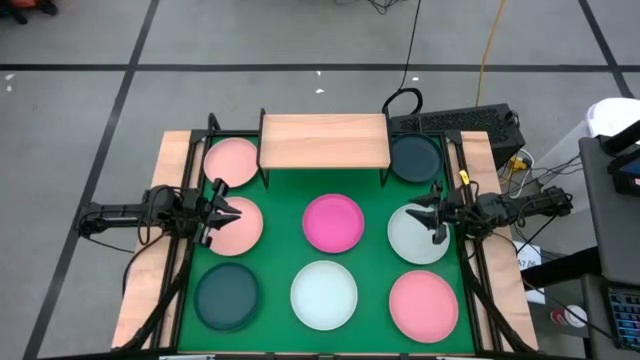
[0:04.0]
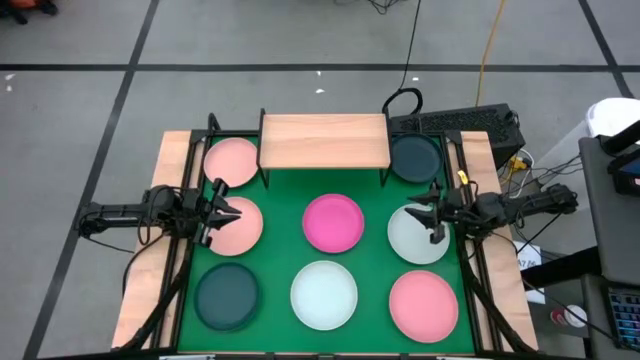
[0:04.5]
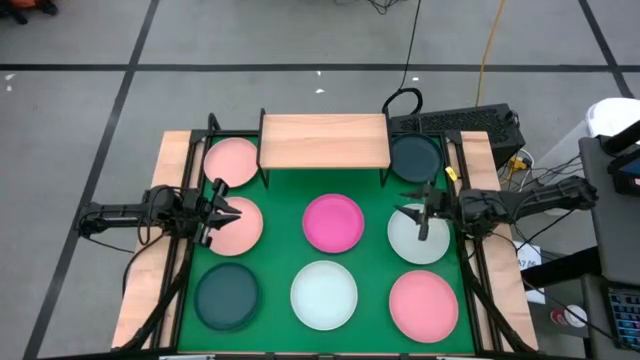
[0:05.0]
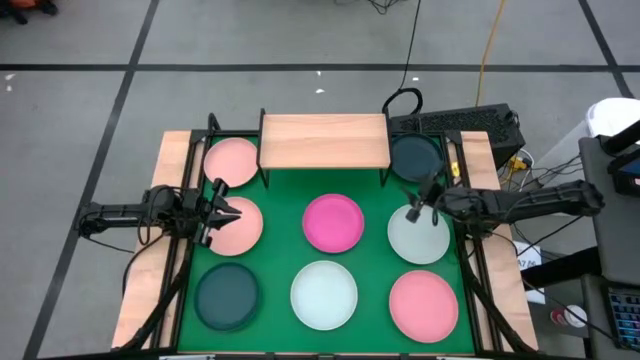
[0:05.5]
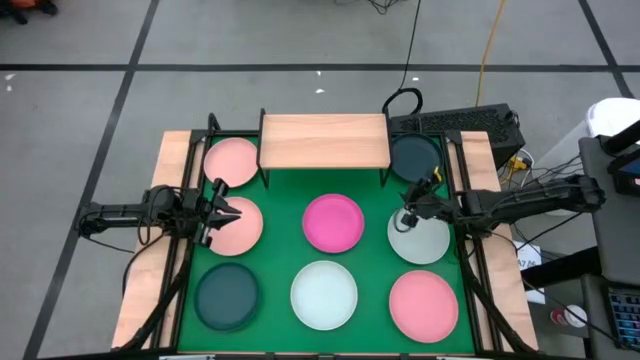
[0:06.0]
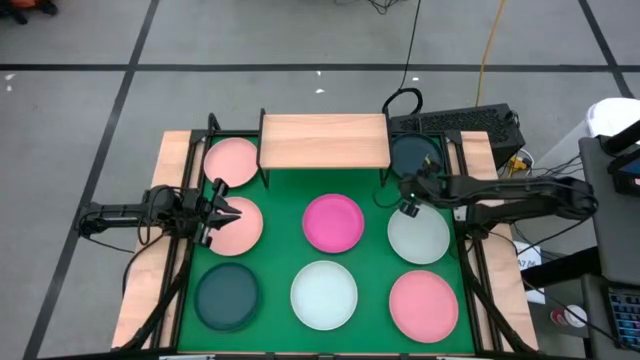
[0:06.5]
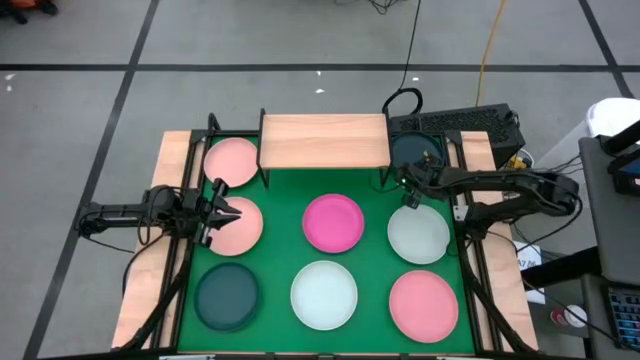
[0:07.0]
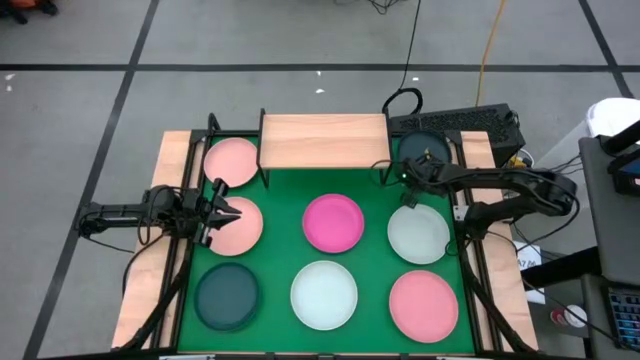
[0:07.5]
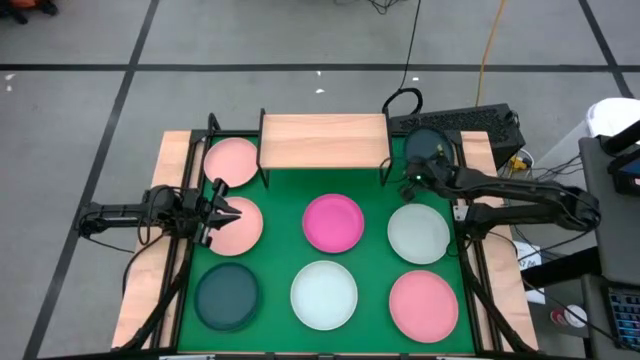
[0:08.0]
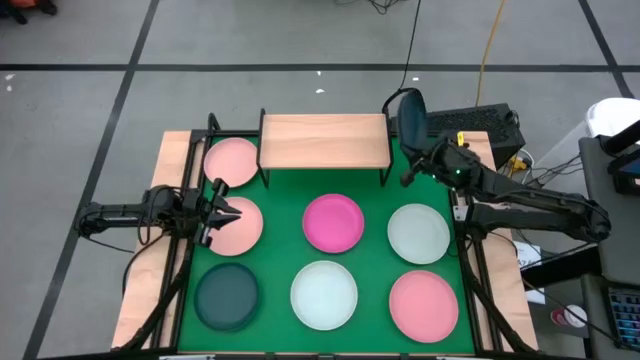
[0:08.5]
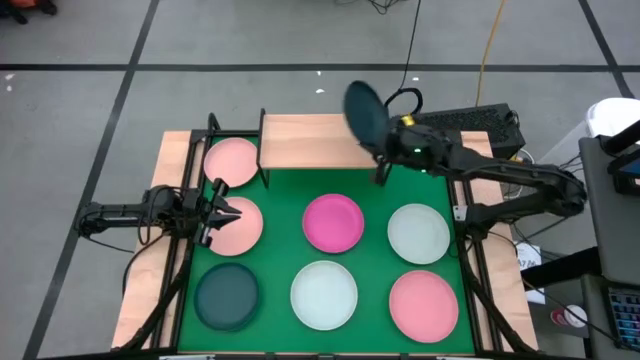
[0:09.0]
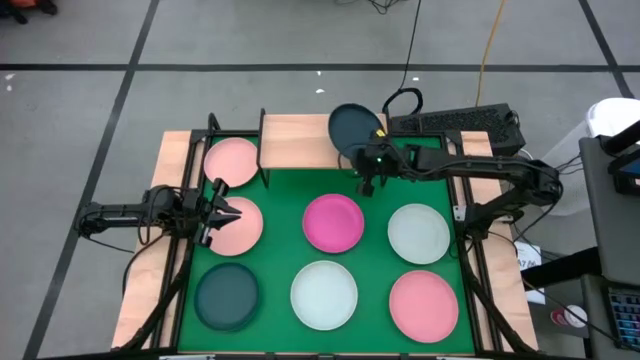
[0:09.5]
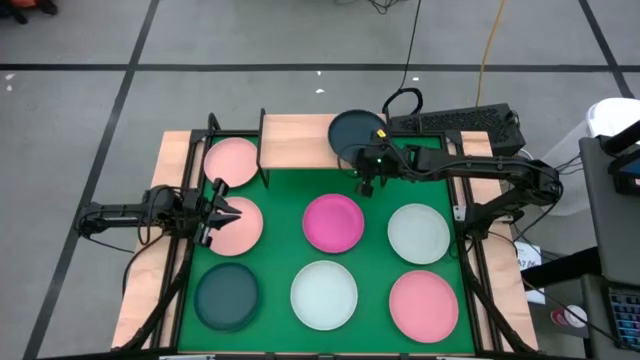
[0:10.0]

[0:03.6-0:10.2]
Task: Place and stack plates onto a shelf
Put the top dark blue plate on the shelf

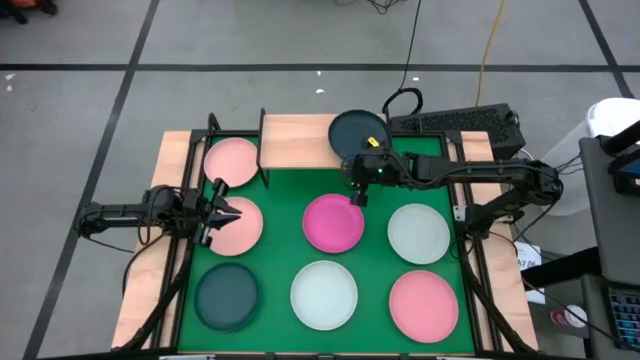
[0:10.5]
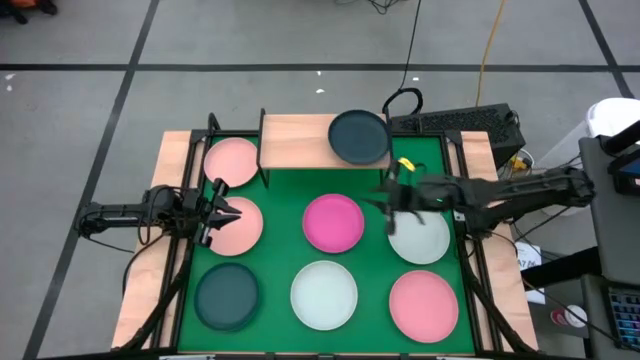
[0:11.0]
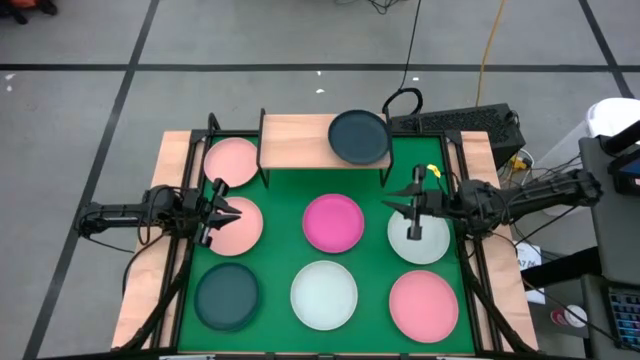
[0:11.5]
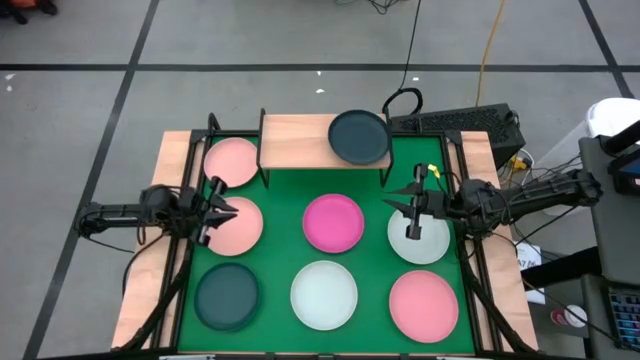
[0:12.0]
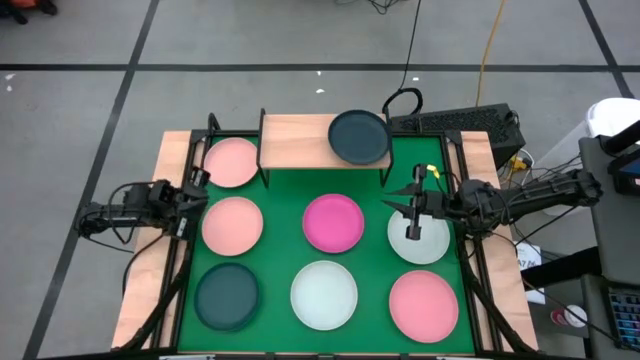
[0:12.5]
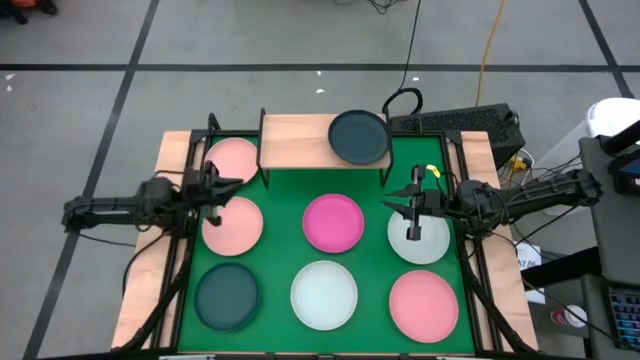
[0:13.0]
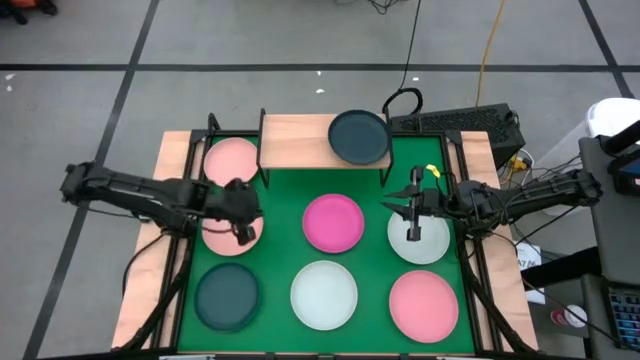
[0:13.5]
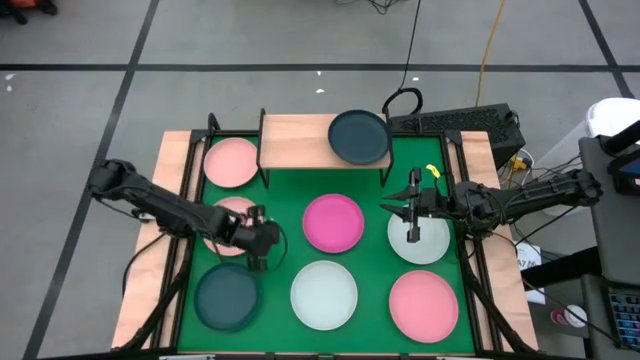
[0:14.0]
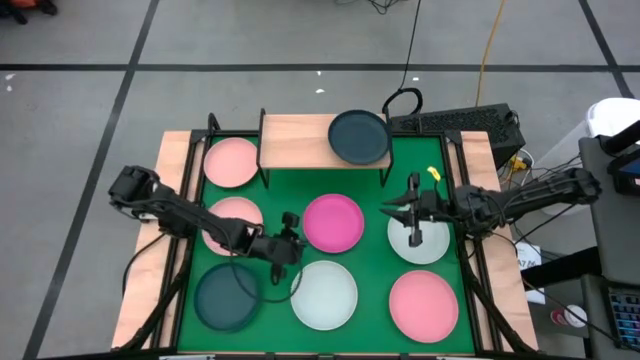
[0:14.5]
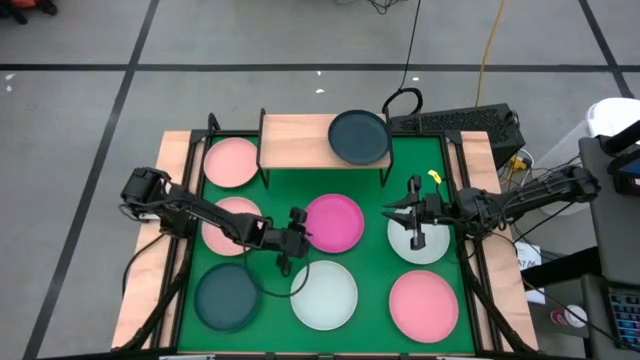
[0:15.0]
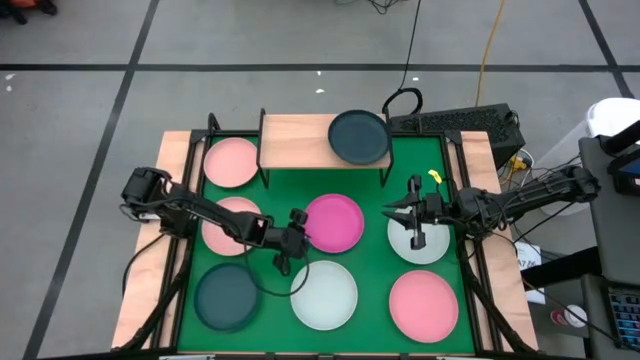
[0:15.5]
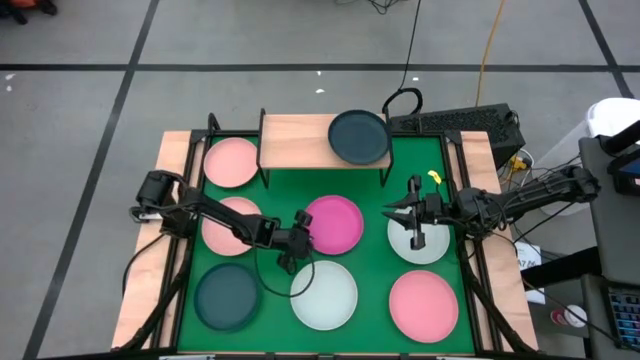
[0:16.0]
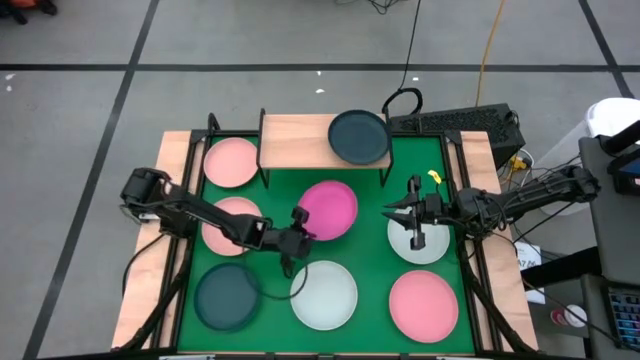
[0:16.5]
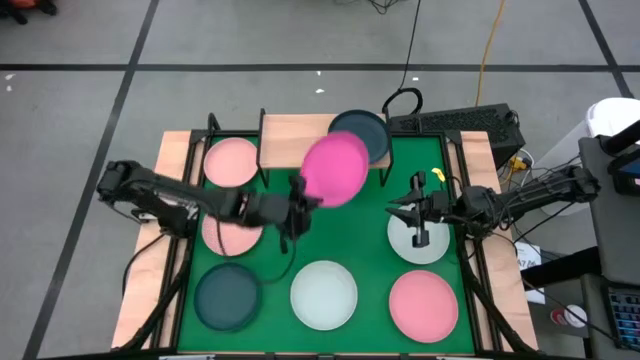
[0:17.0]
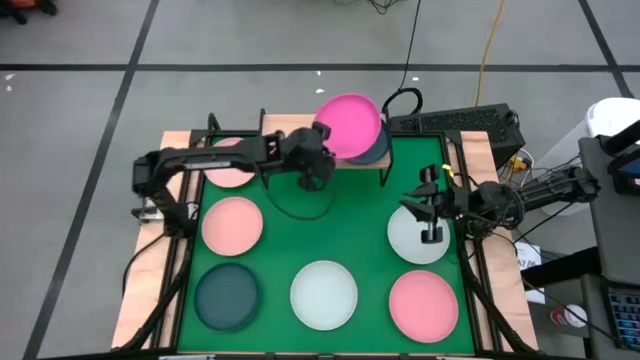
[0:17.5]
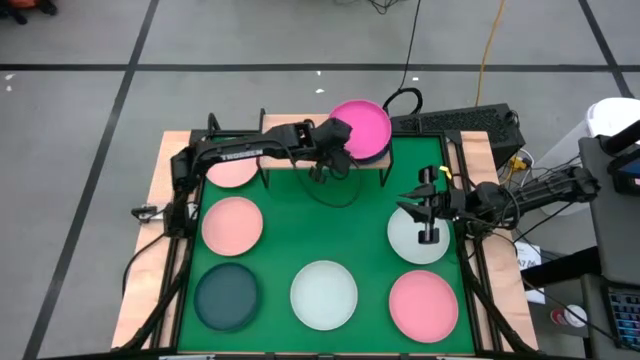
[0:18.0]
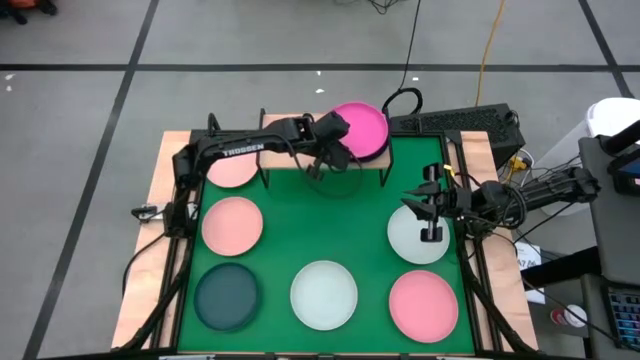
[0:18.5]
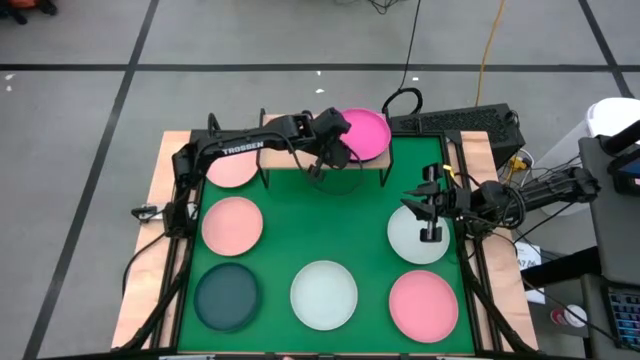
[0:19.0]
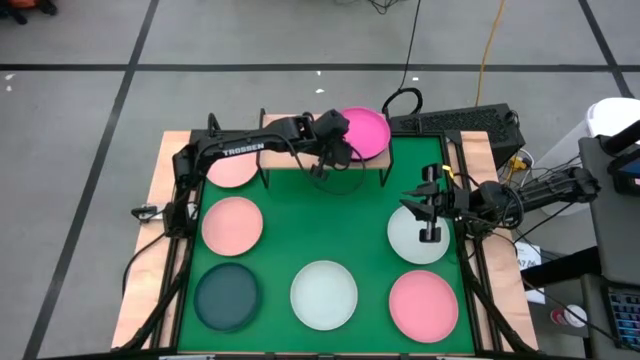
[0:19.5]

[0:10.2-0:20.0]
Stack the pink plate on top of dark blue plate on the shelf

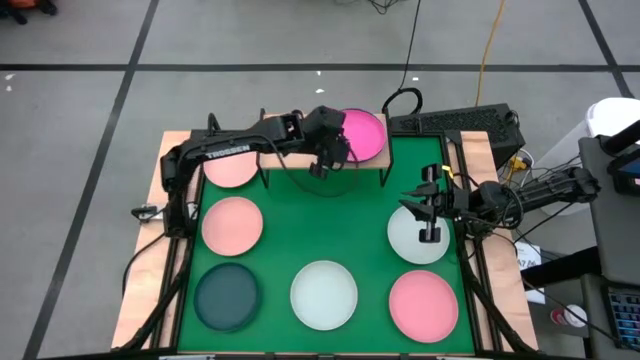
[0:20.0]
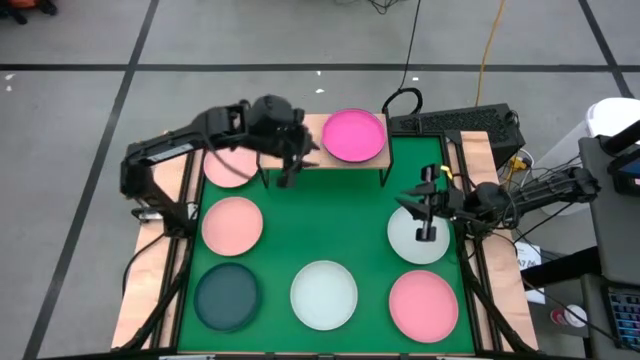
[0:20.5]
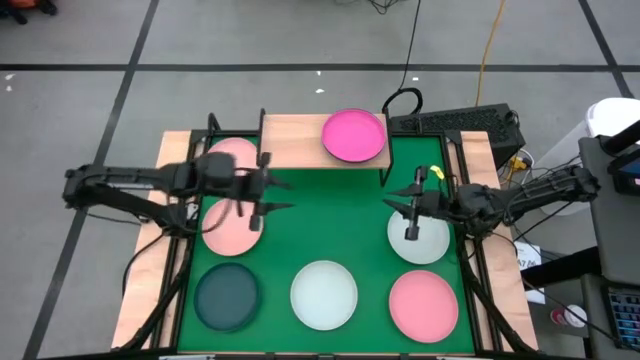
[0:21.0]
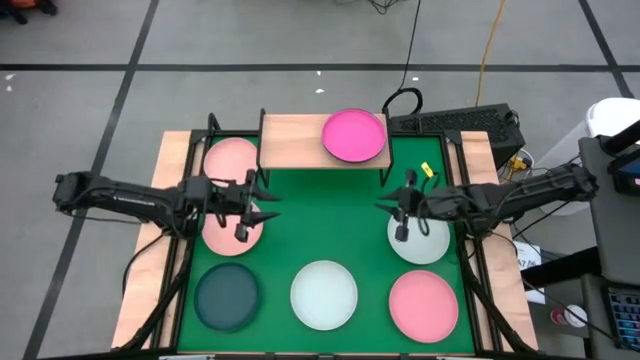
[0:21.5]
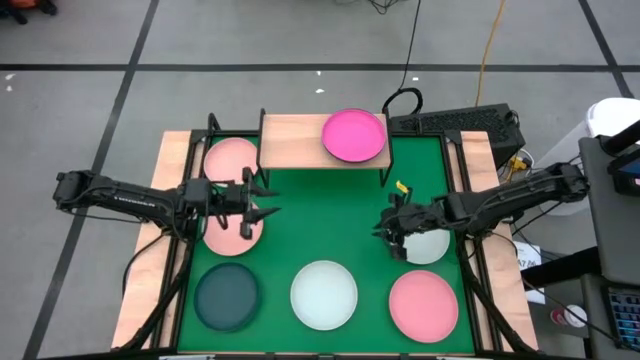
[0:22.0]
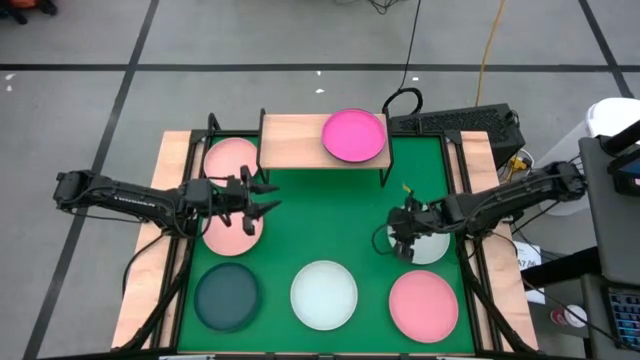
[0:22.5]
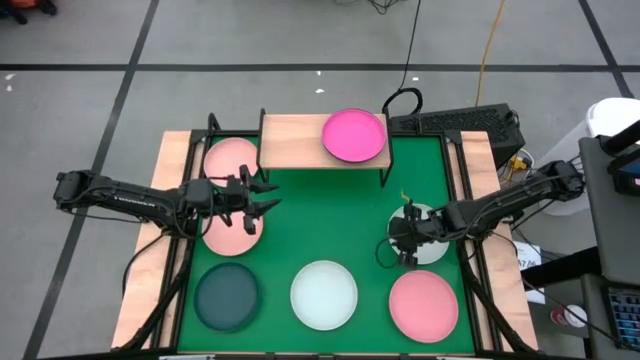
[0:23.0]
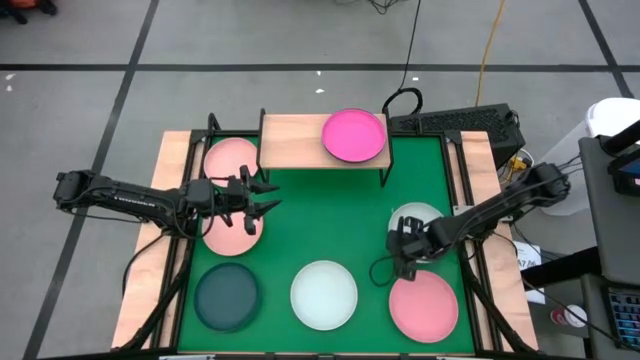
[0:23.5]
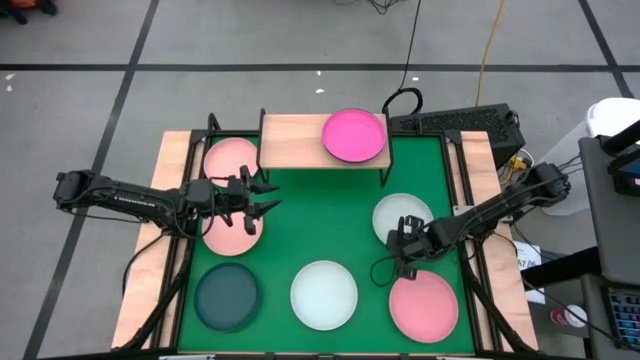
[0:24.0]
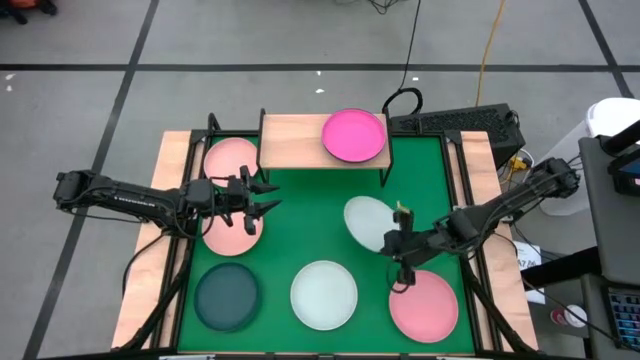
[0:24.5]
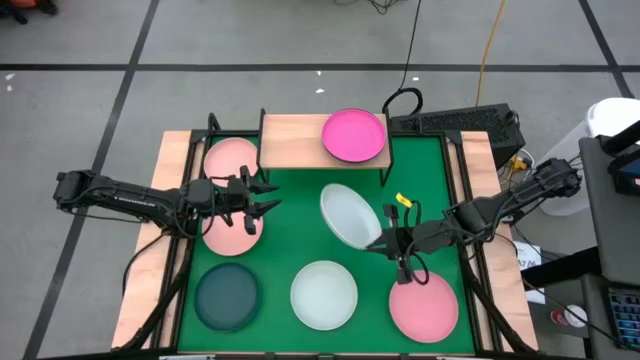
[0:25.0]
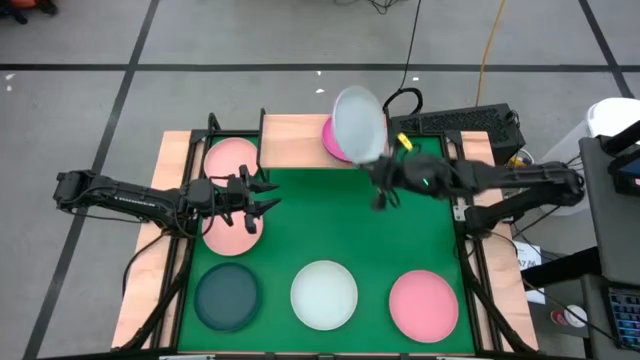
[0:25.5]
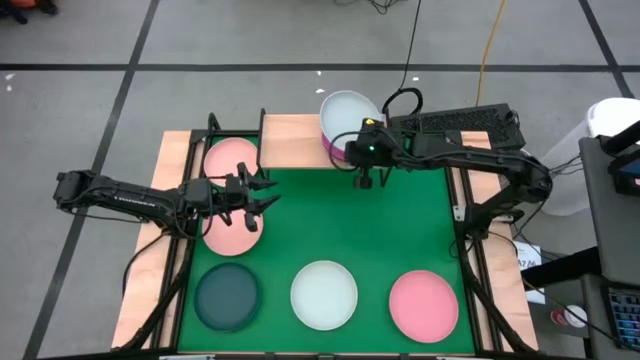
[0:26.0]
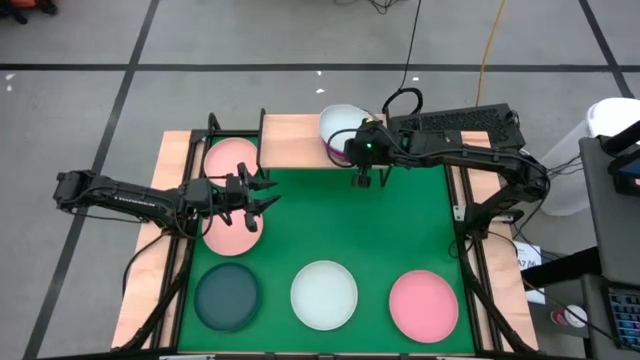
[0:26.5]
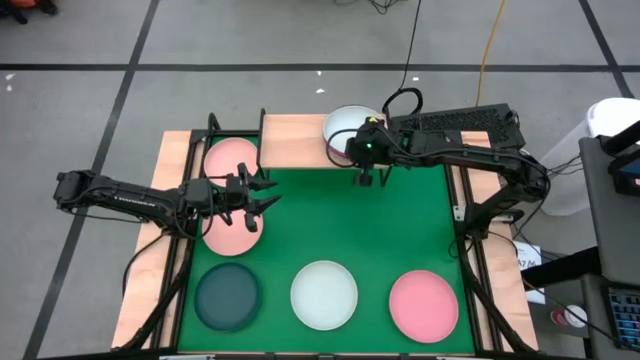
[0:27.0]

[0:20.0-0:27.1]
Stack the top white plate on top of pink plate on the shelf
